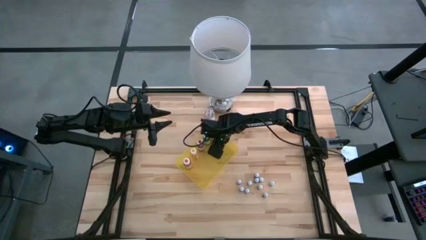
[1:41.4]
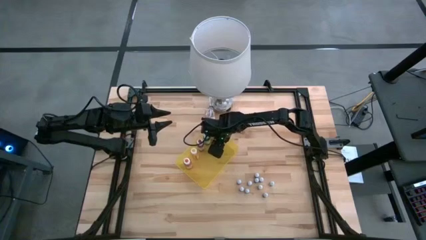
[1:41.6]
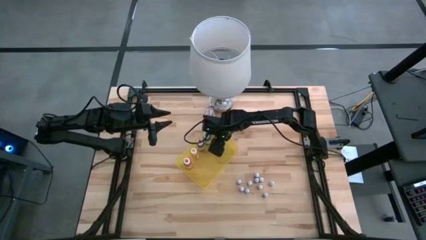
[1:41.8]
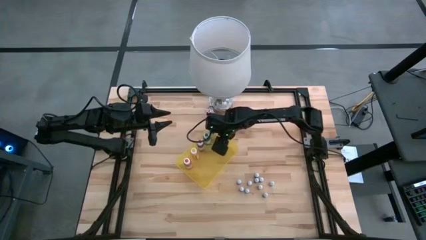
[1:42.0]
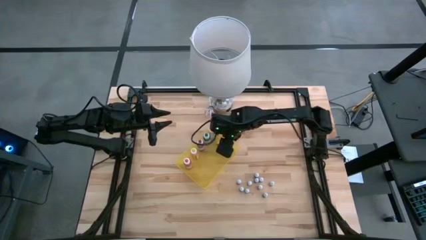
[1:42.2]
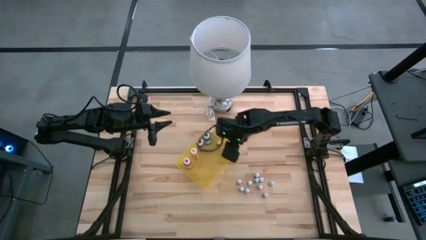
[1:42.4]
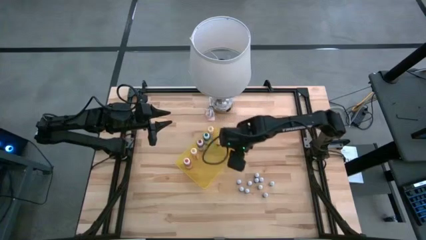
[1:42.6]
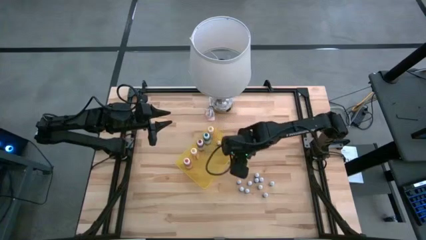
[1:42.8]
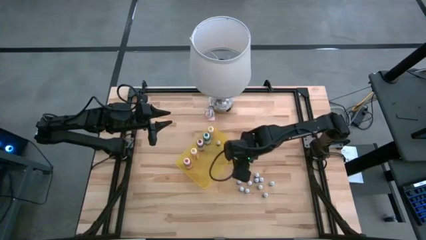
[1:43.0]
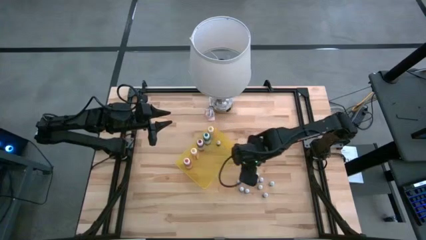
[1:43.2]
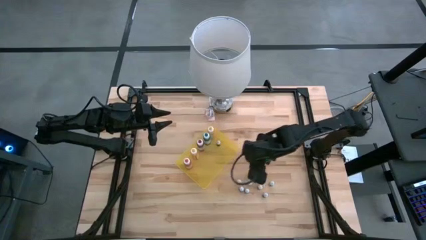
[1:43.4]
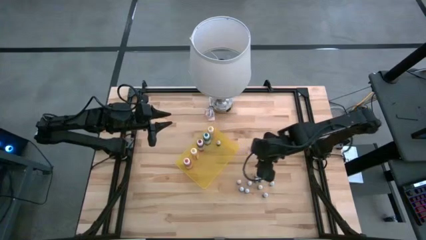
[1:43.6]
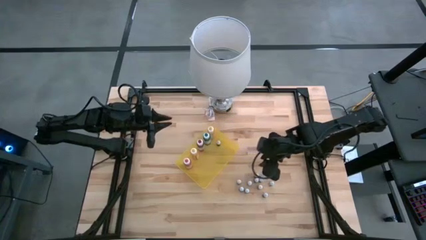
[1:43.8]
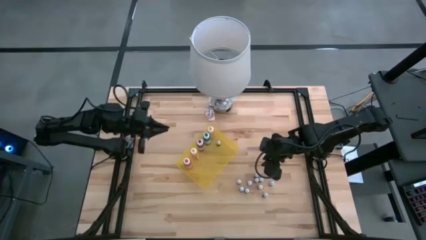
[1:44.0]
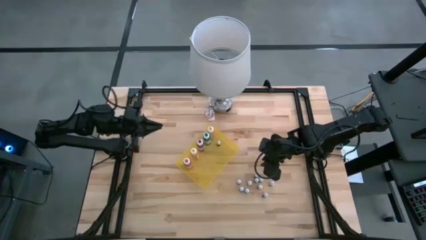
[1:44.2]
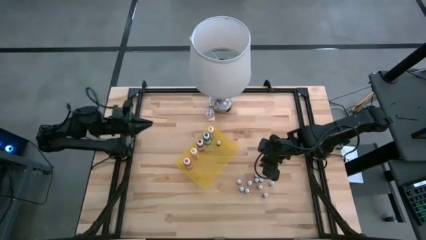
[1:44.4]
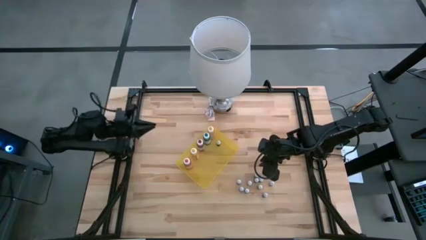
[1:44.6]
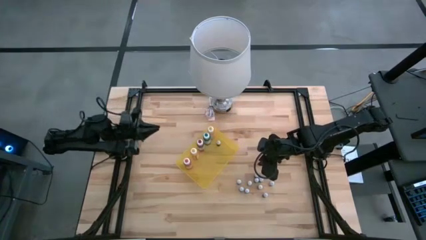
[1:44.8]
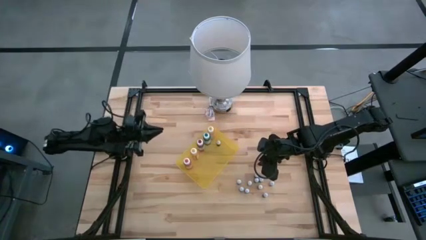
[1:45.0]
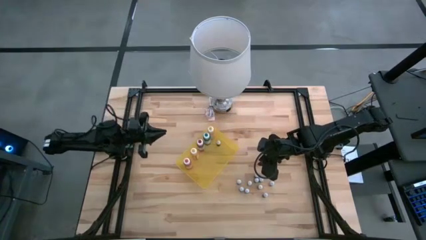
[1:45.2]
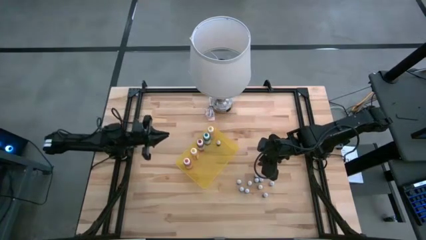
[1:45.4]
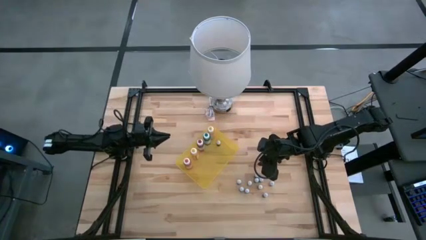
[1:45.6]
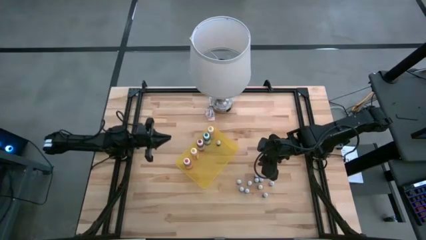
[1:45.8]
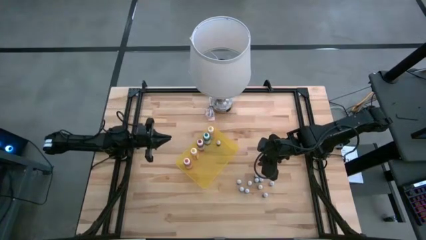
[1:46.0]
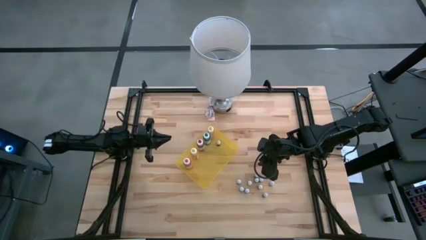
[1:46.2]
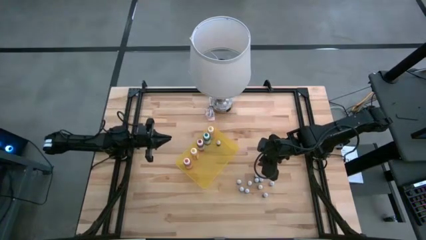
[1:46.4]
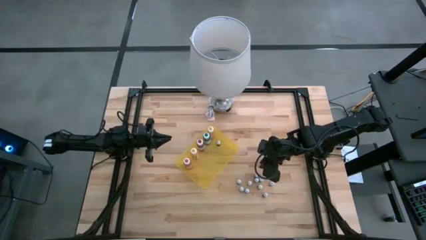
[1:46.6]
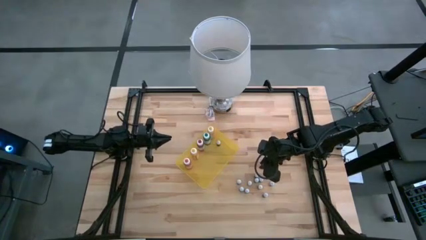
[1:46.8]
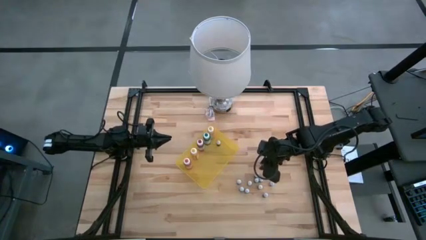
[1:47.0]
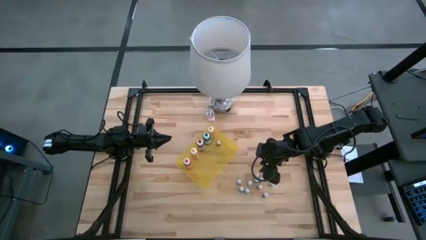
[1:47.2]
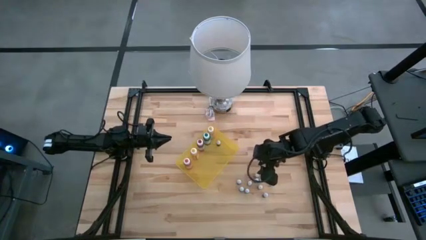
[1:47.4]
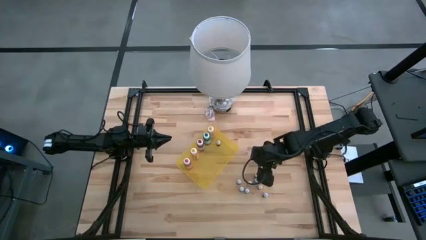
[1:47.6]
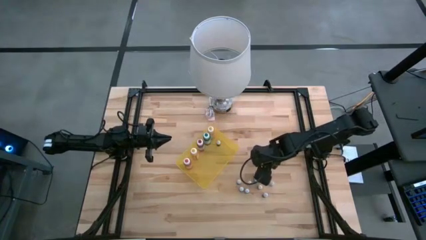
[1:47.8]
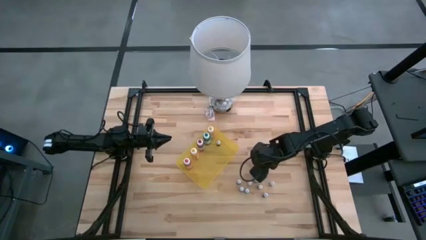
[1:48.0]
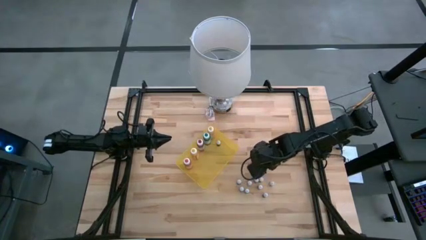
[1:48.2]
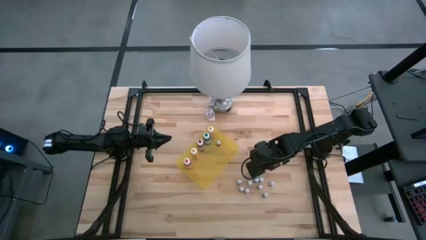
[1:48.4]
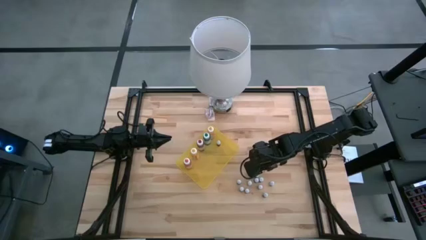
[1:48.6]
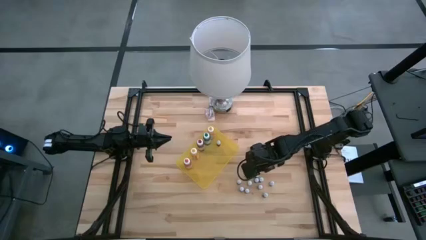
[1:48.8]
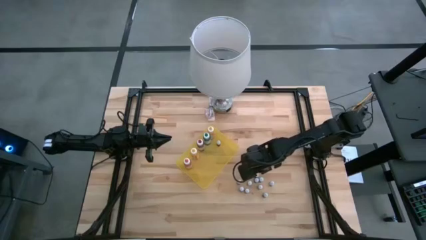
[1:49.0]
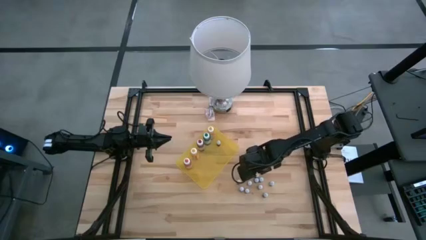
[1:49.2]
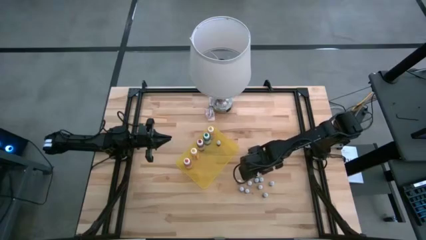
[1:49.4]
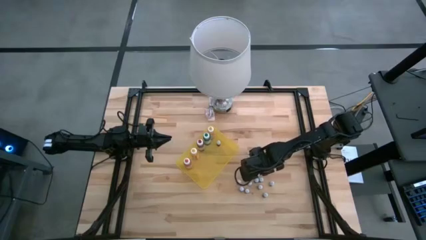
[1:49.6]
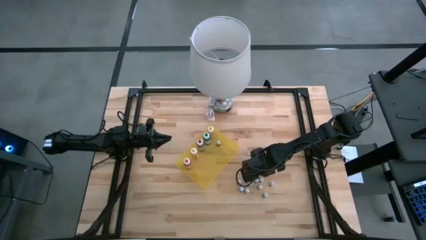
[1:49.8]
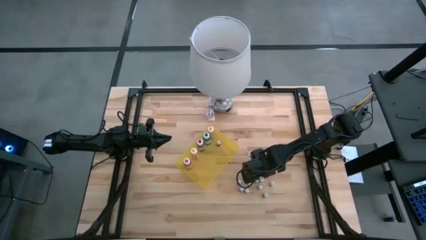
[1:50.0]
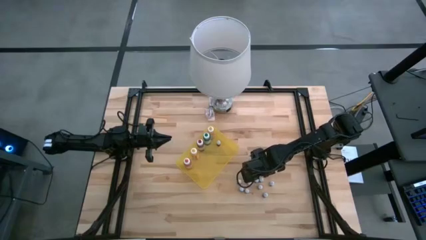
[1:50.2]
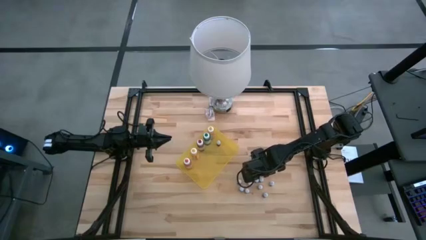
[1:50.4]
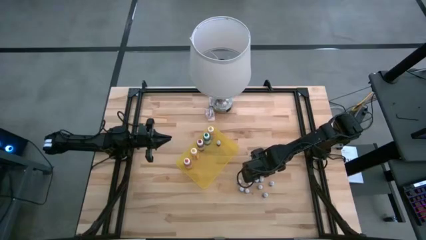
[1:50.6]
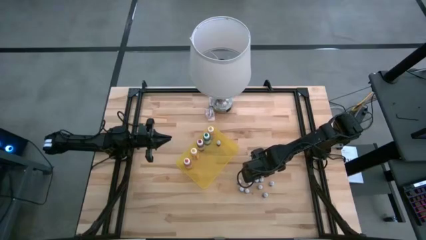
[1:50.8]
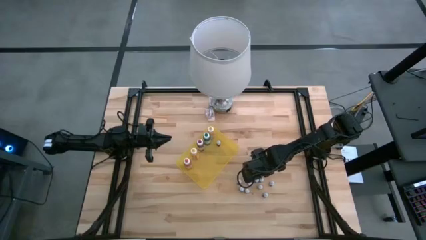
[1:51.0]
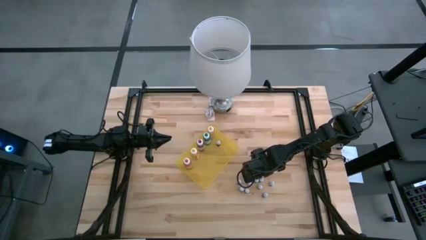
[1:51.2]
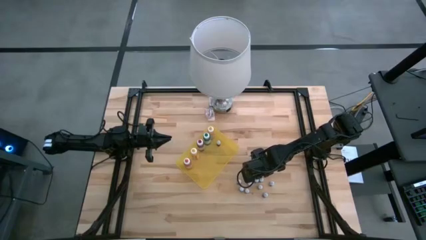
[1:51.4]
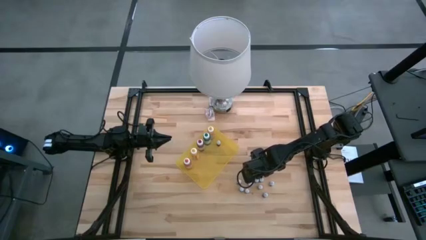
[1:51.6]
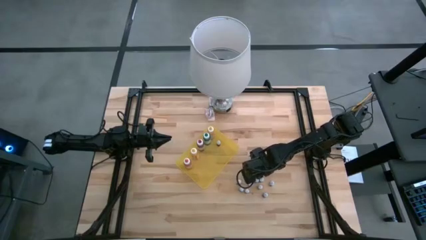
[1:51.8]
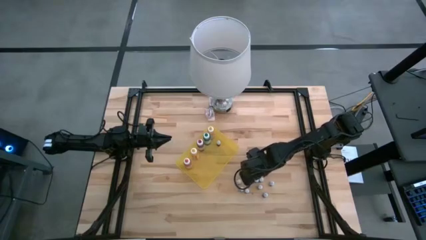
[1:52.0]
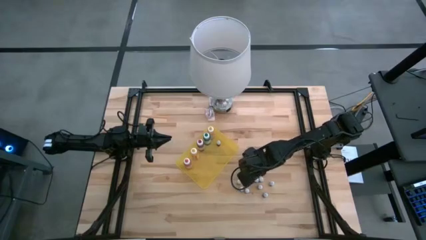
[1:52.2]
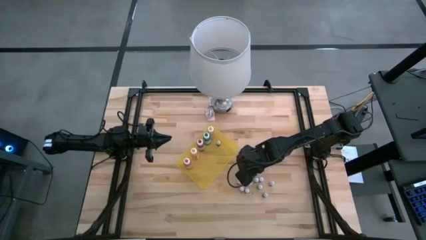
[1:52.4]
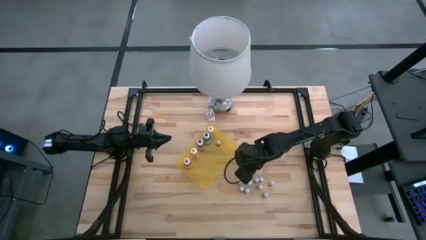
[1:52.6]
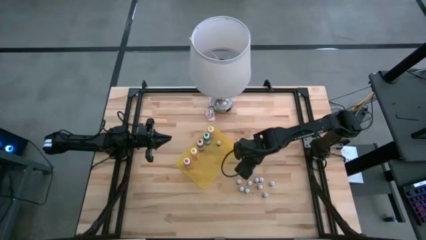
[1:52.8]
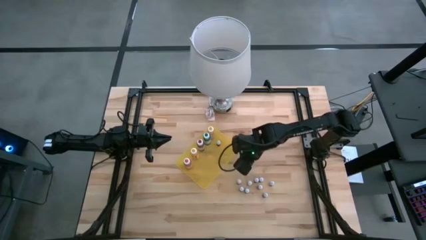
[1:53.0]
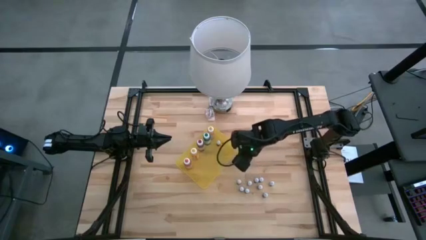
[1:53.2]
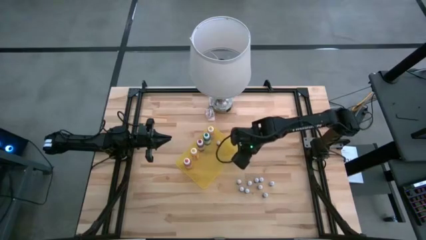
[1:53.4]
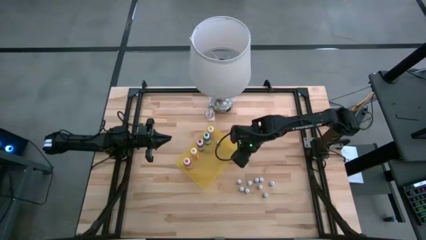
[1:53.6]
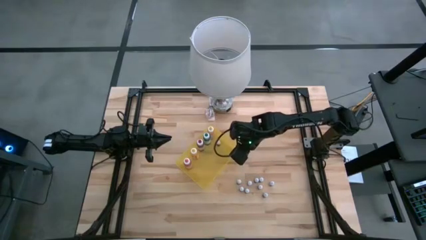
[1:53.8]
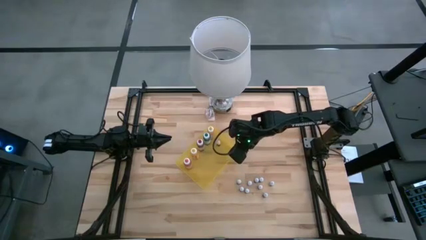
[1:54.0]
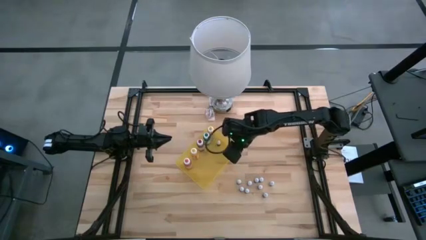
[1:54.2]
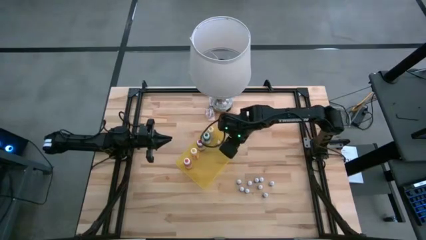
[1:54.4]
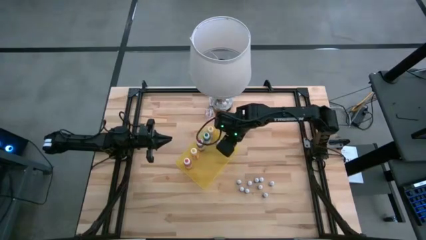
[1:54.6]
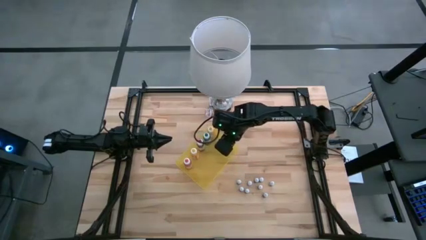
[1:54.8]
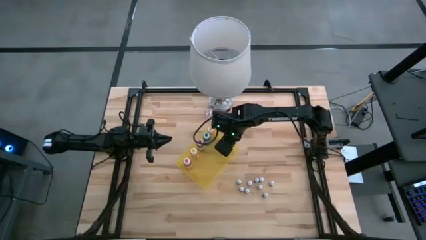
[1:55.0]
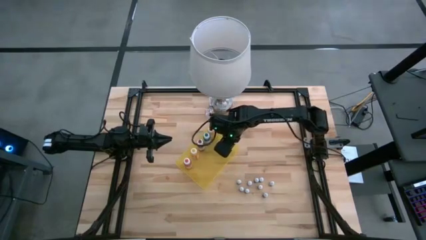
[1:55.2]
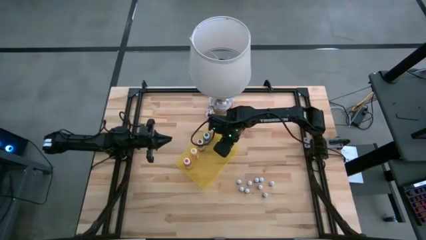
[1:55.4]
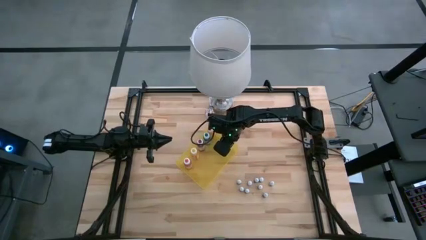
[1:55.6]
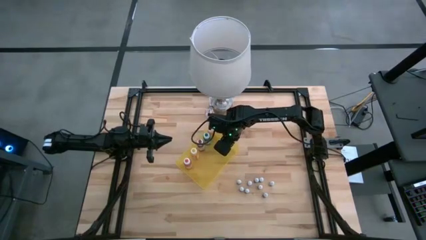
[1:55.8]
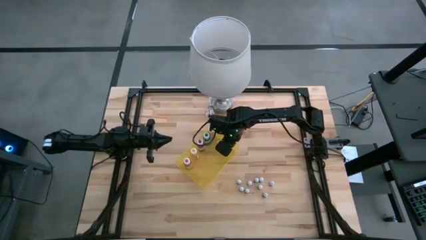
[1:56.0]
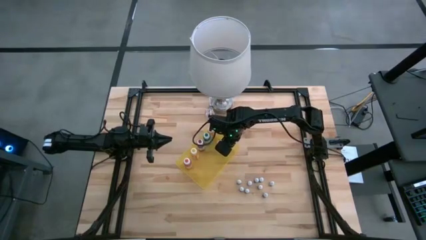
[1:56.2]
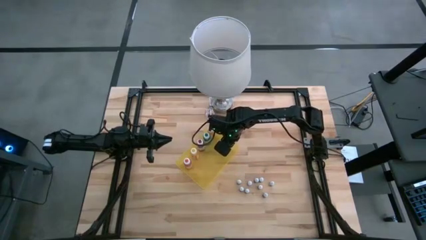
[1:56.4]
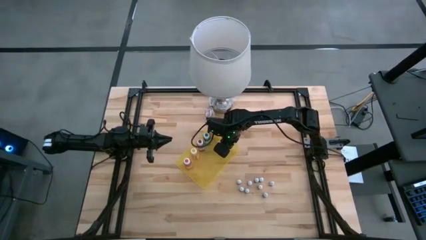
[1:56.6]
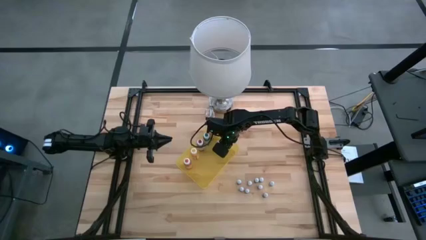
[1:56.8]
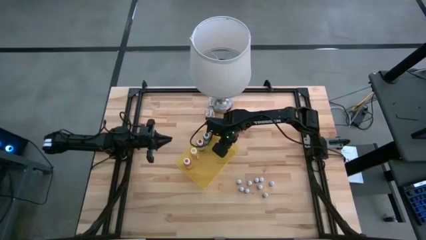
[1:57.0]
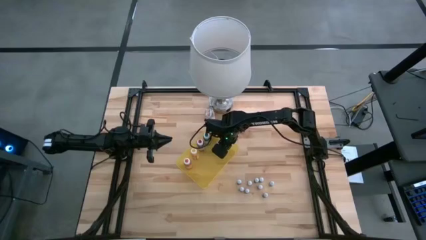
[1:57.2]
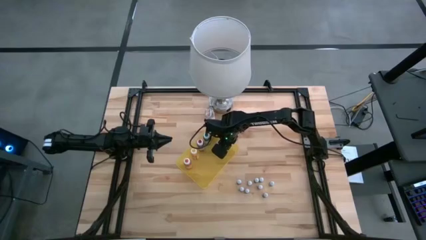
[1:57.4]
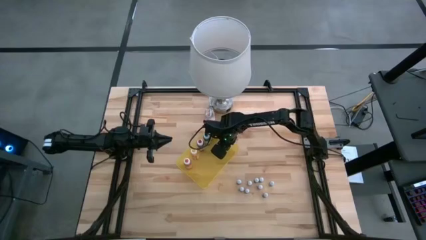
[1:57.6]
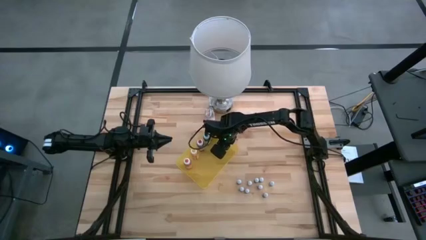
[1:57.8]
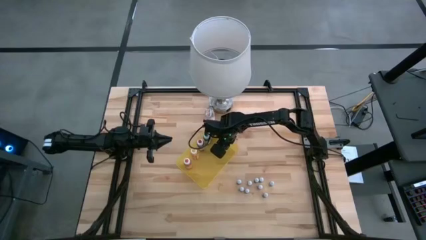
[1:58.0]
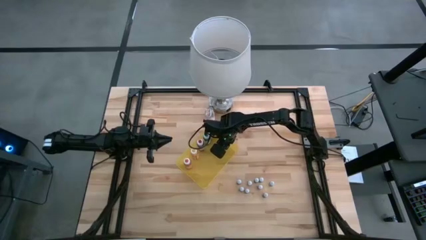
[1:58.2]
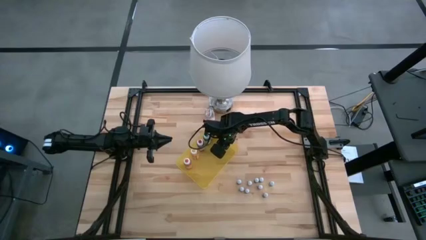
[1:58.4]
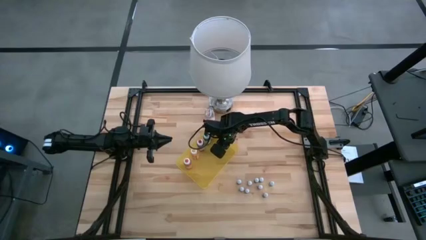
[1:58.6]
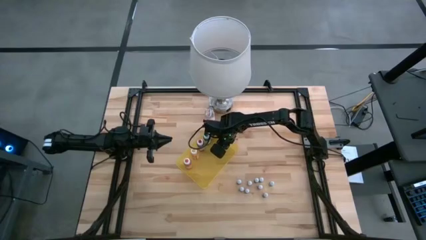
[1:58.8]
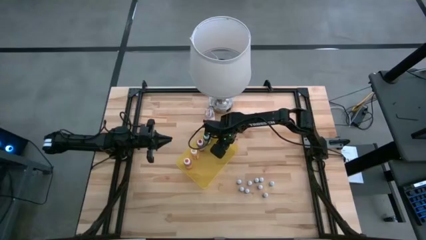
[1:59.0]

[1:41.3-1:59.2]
Task: Pick & Place food coloring
Put the small purple food coloring bottle into the yellow bin
